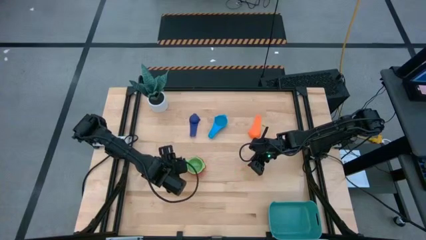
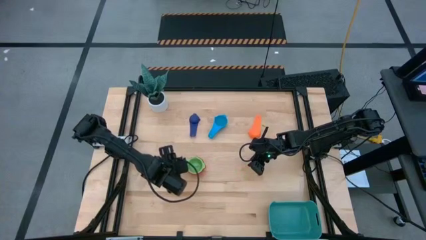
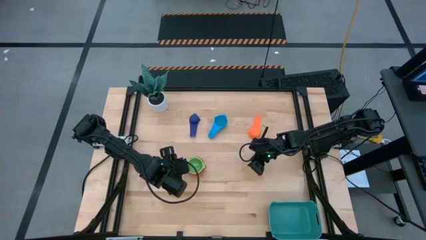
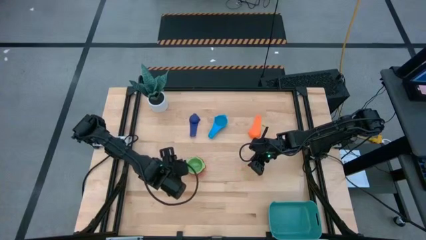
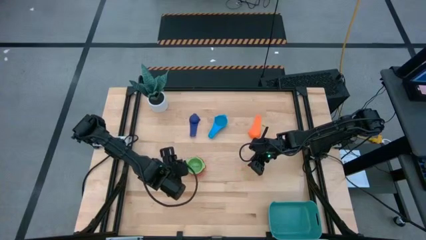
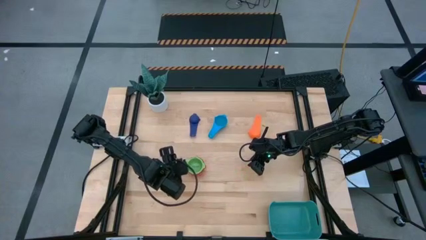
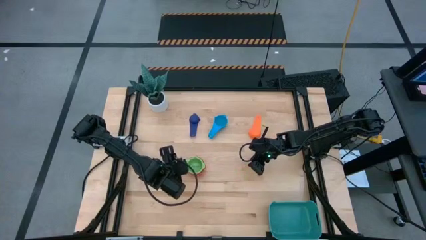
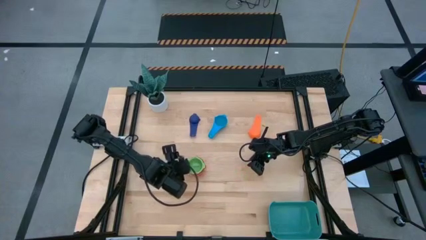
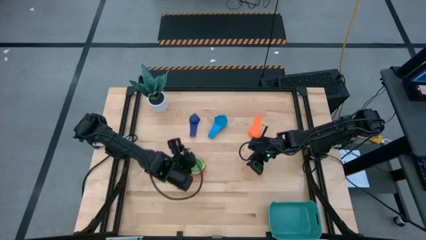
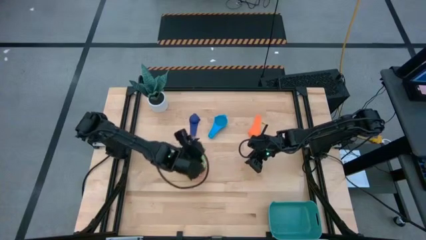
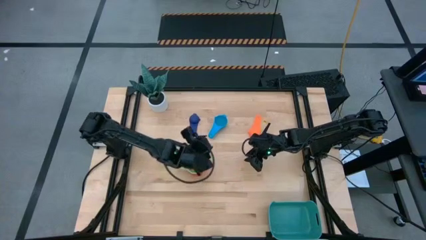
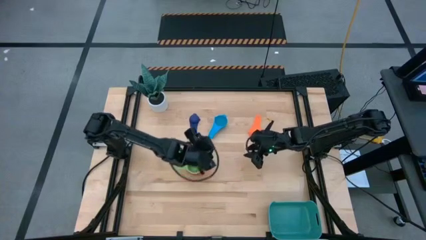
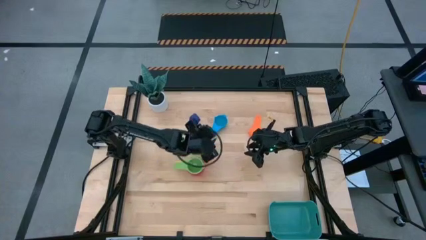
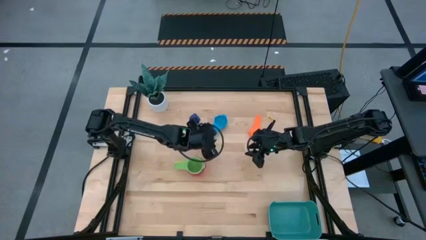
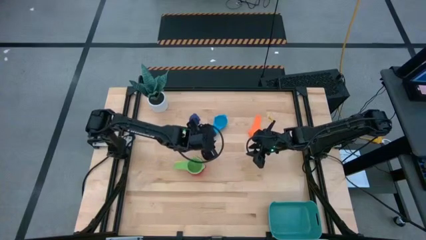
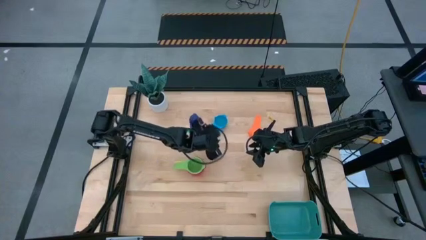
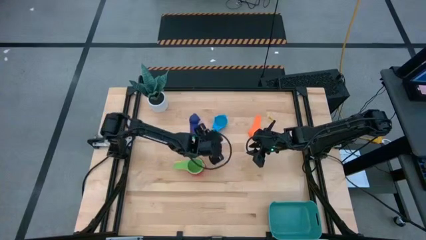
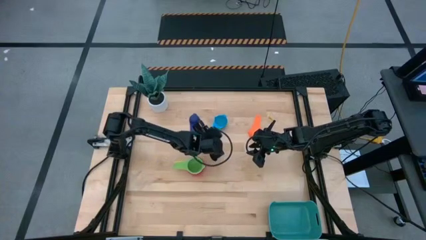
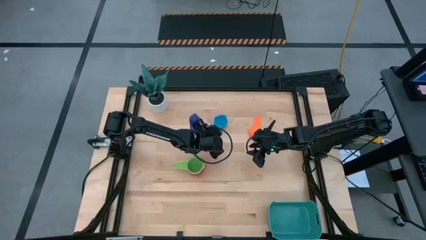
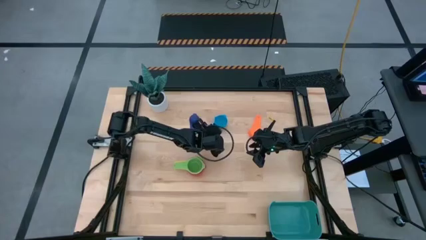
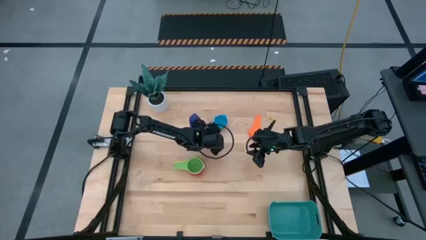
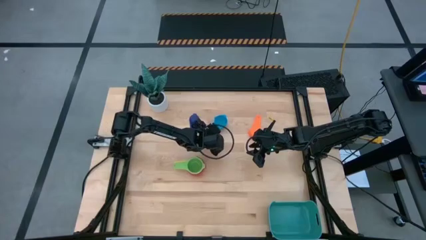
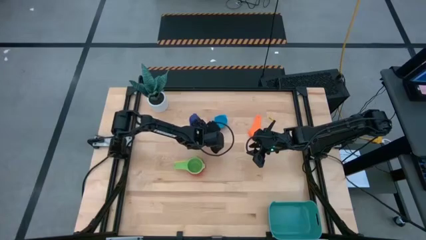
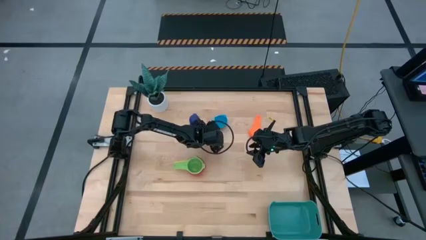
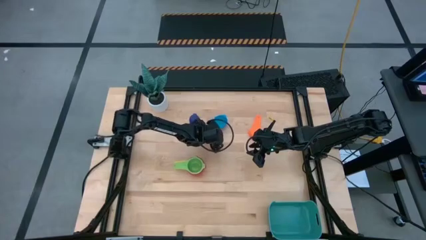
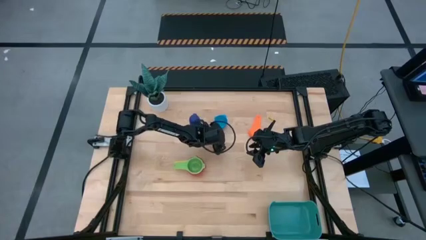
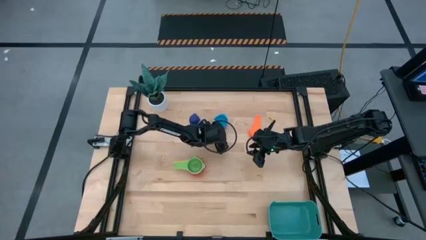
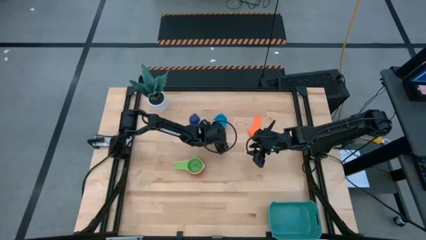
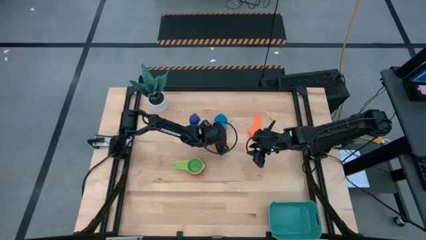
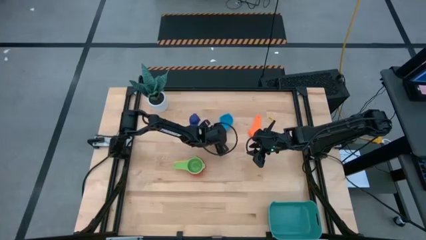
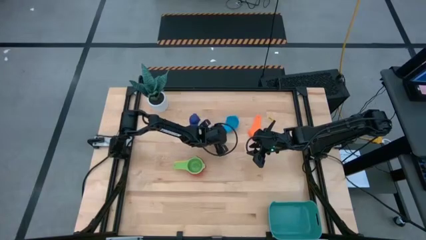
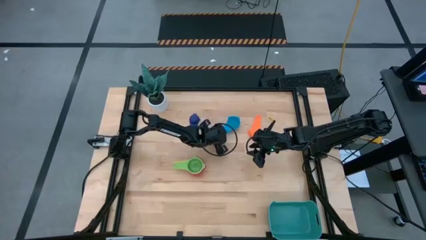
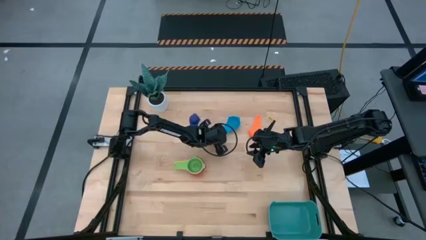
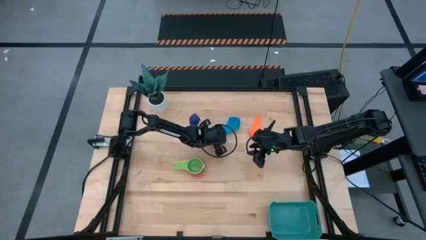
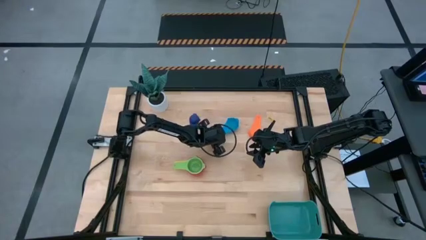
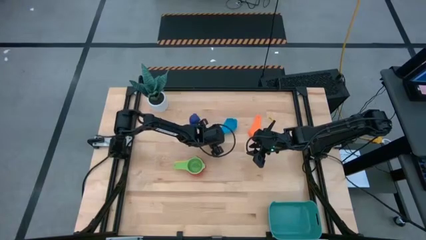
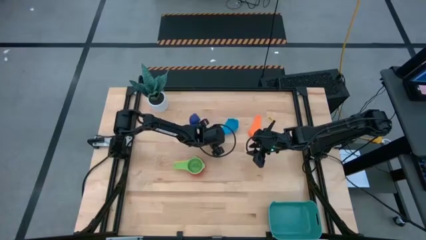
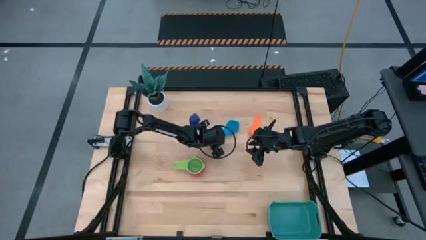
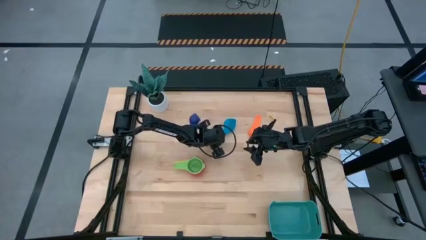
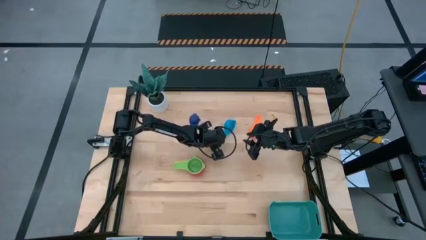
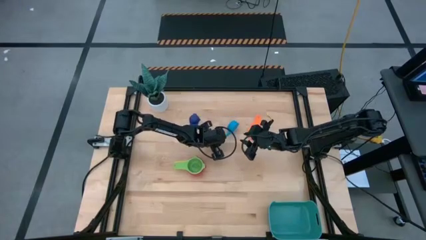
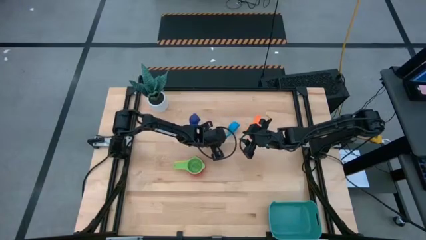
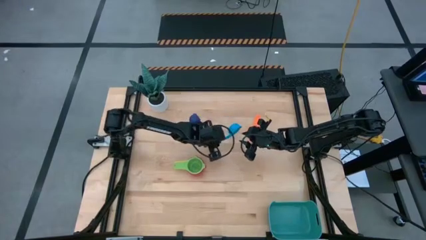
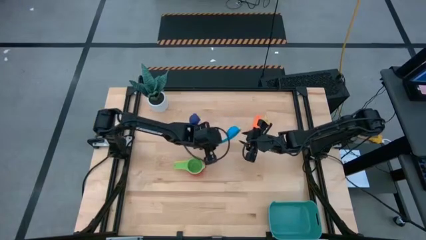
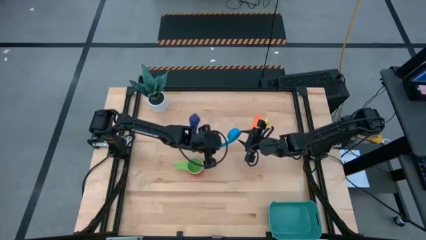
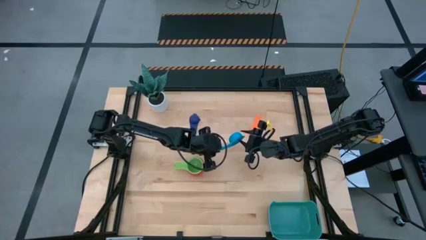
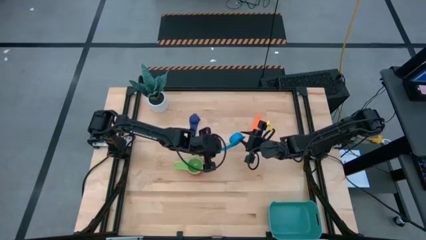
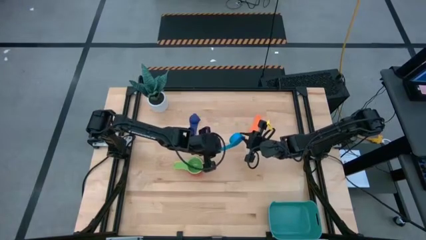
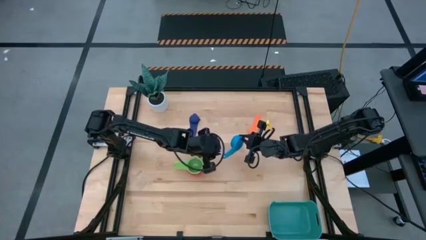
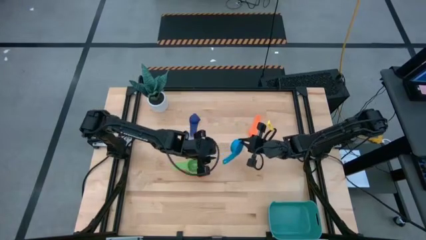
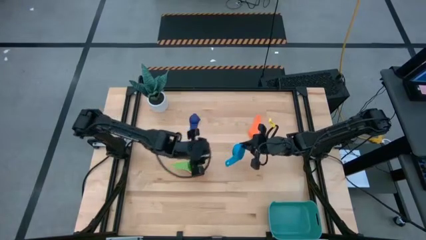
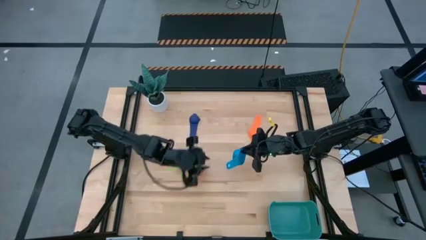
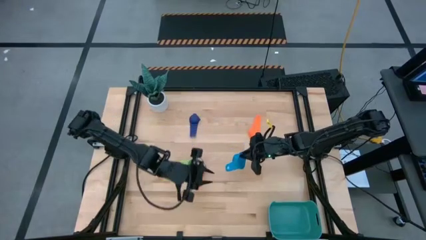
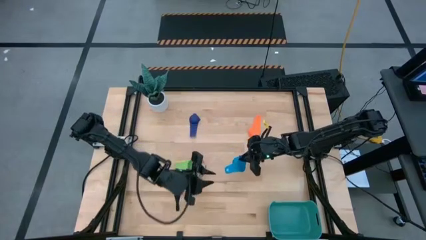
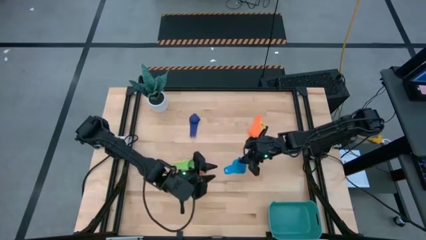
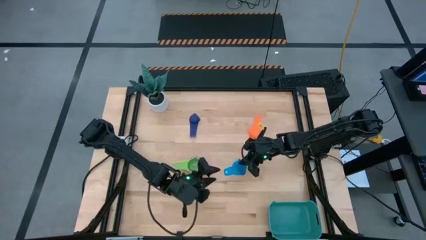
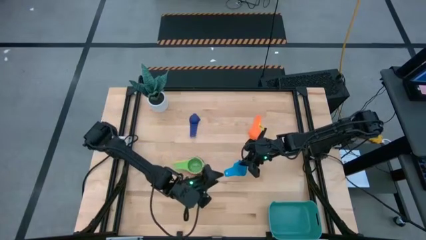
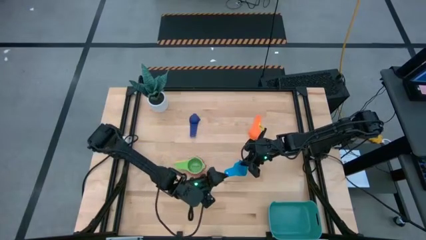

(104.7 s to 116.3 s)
Task: Nest measuring cups in basket
Stack the light blue measuring cup on top of the green measuring cup

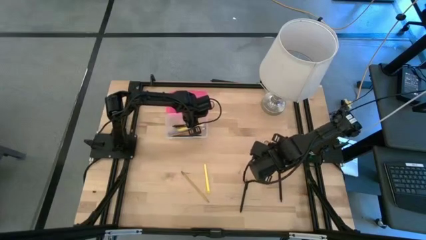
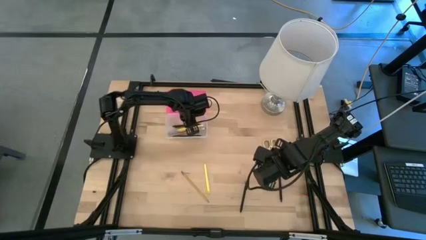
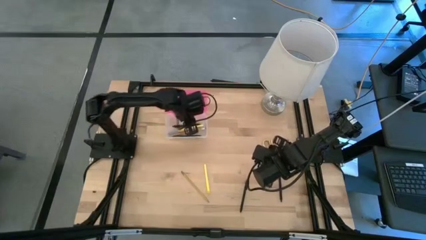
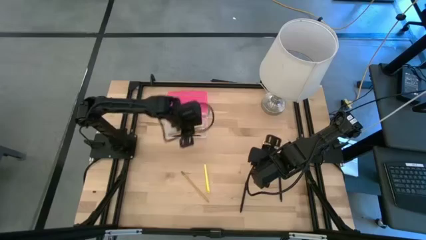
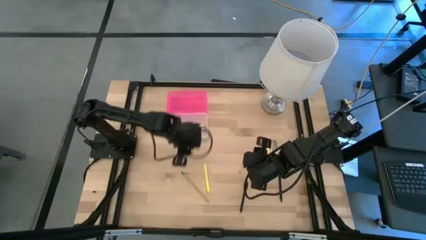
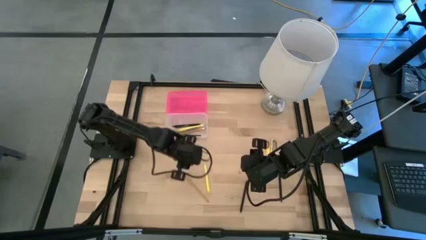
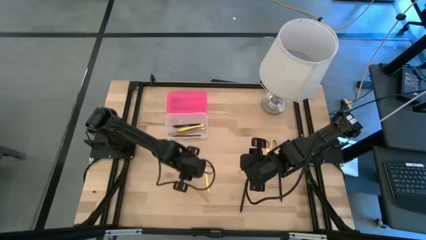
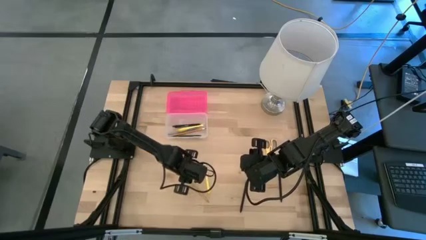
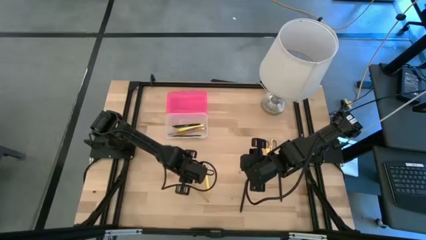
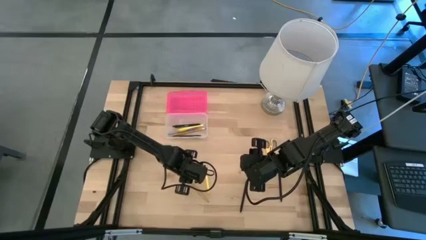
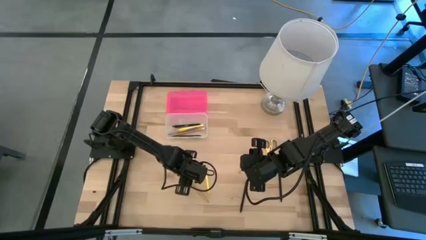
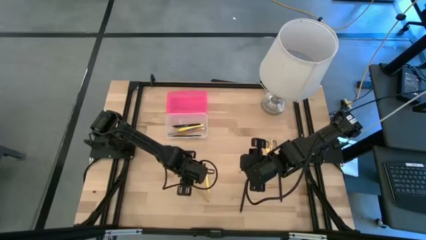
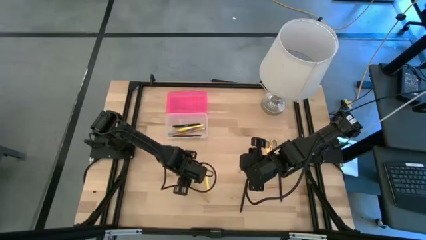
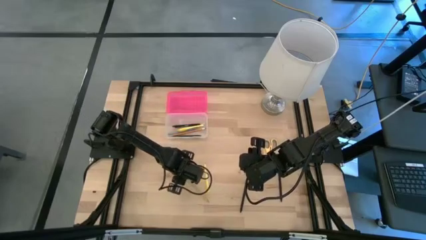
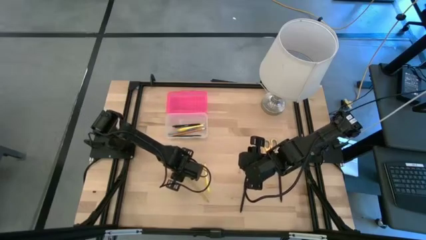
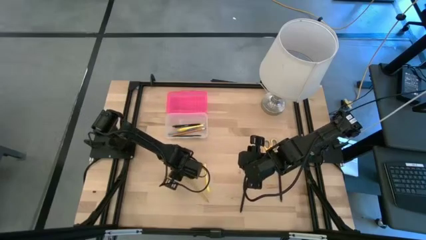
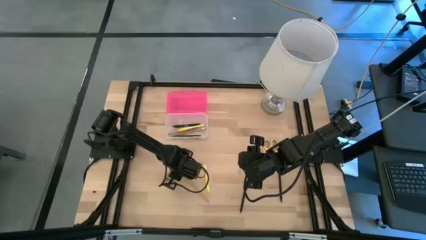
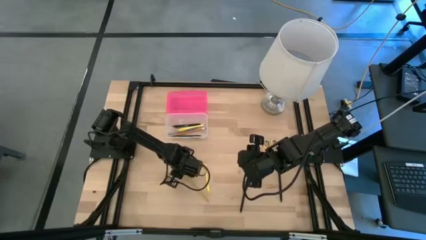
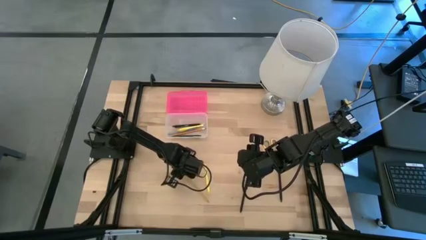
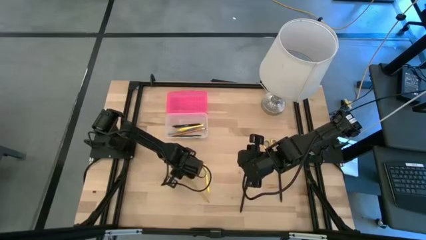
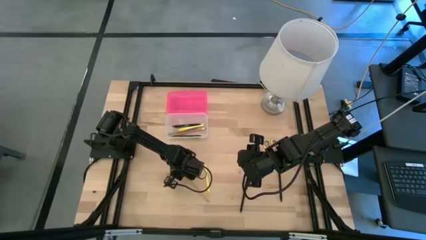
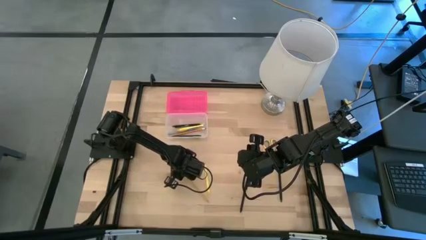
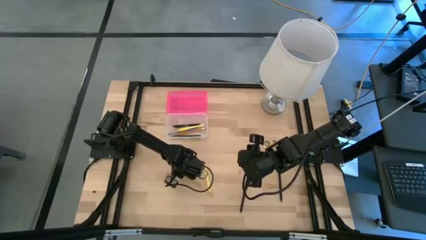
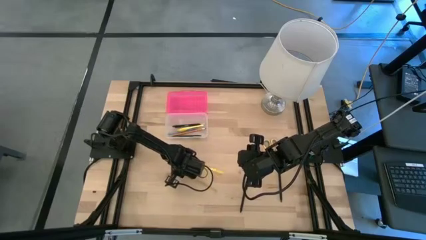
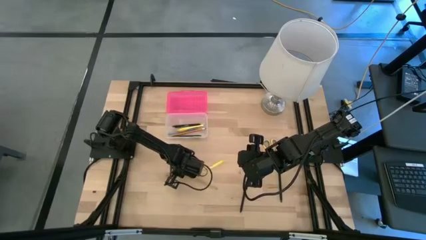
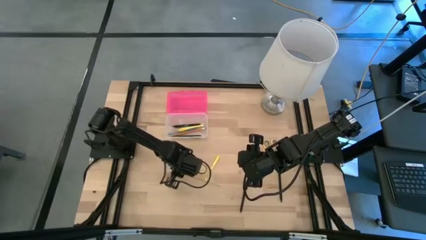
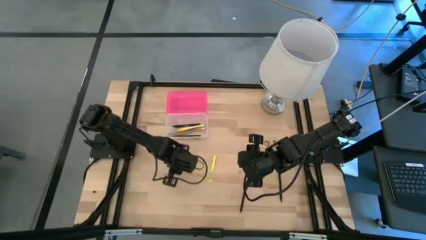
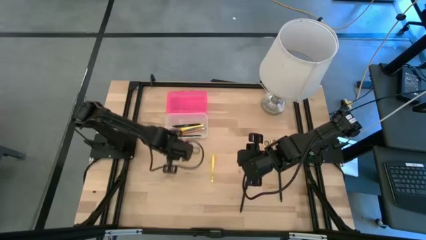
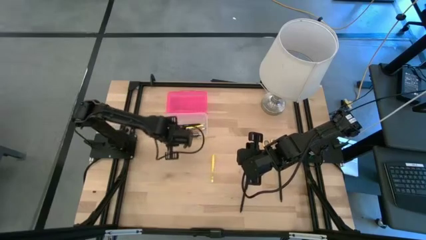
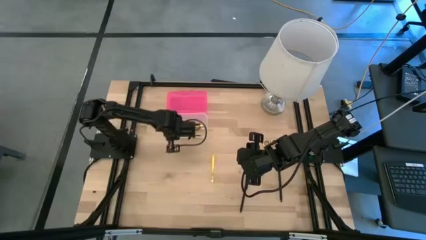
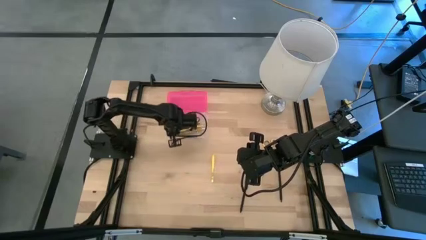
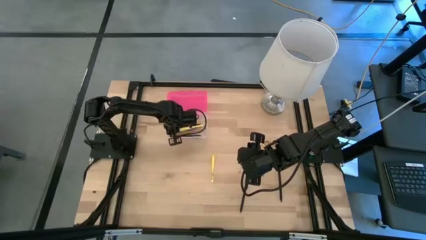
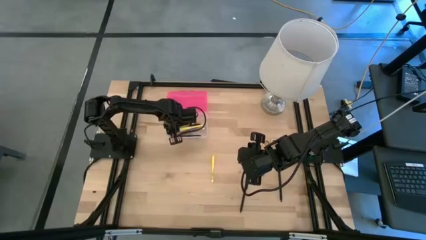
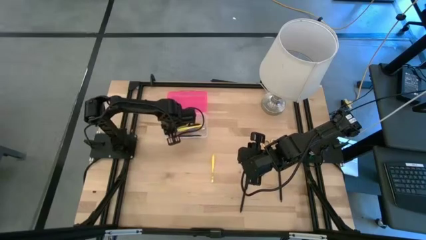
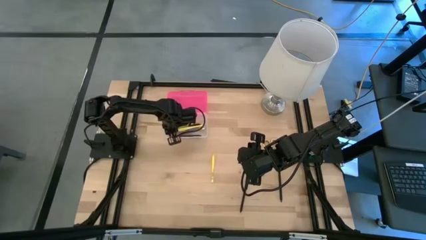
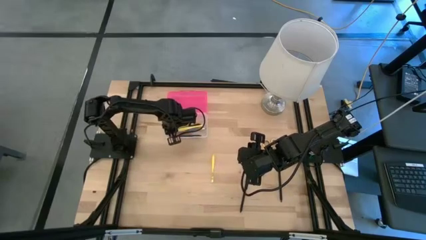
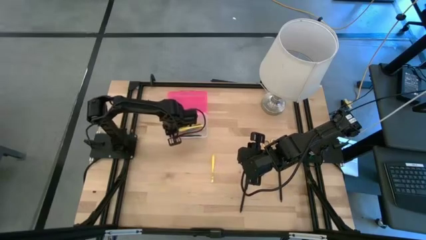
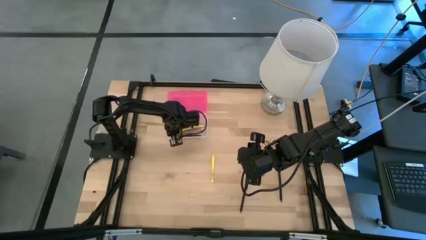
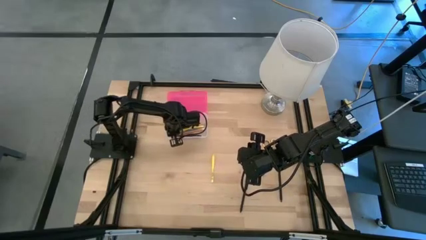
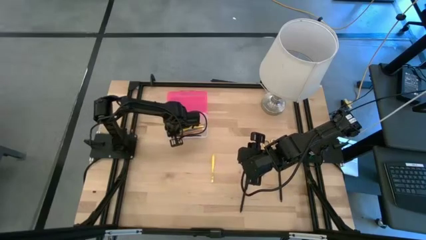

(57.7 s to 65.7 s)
Task: Pick & place school supplies into a supply box
Put the yellow pencil into the pink supply box
